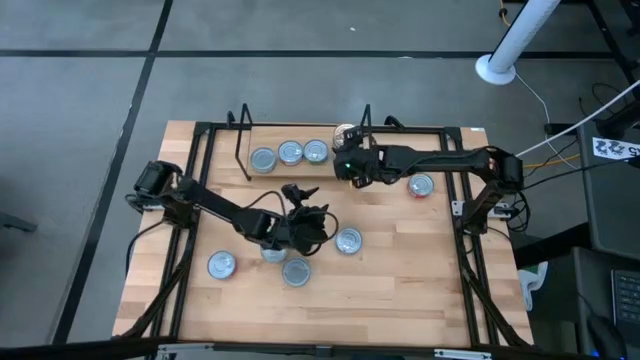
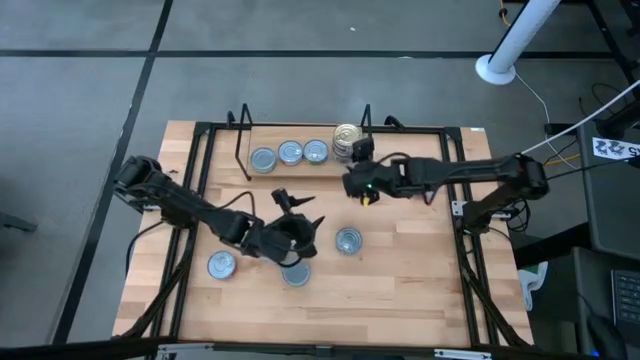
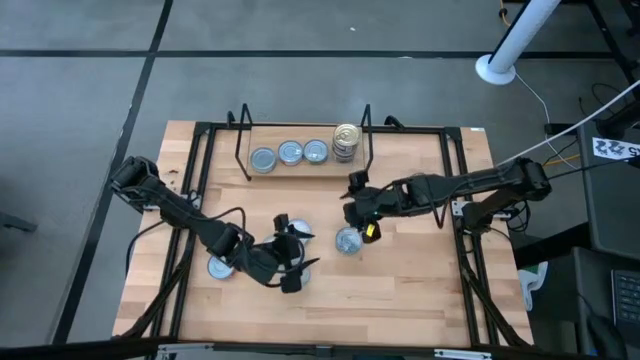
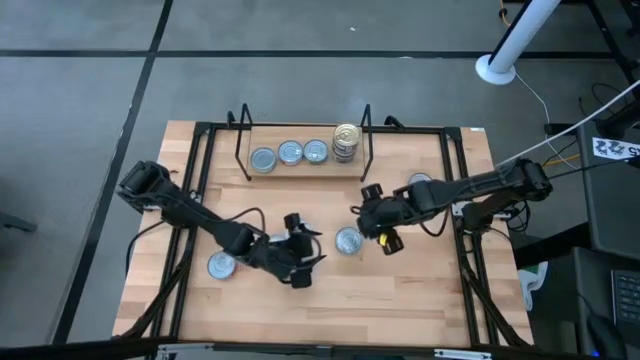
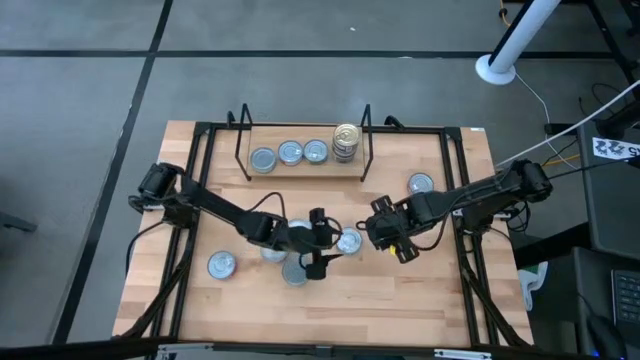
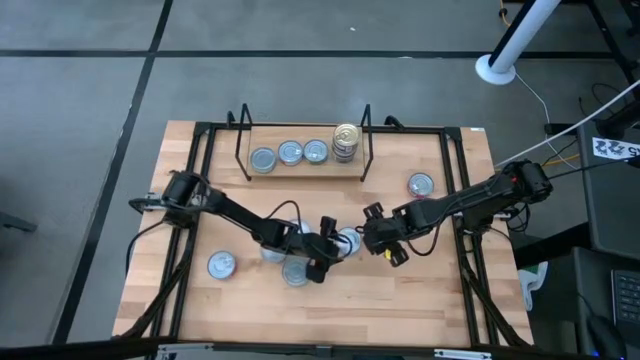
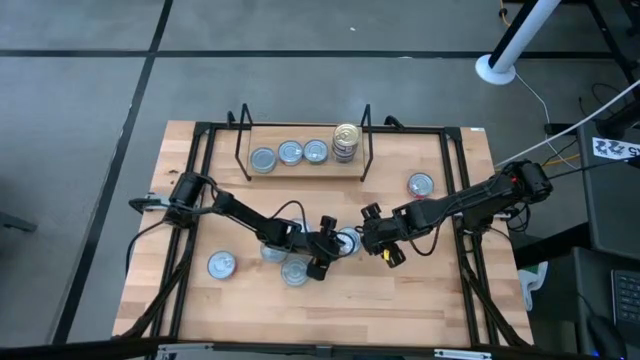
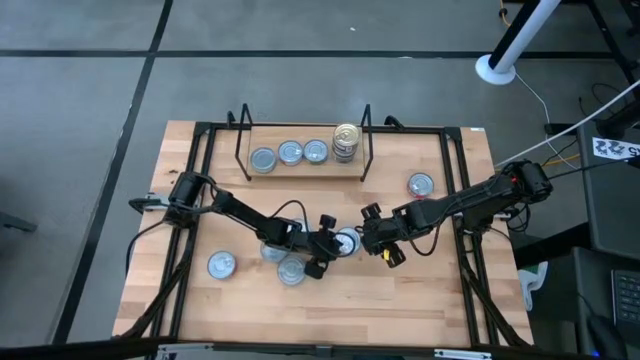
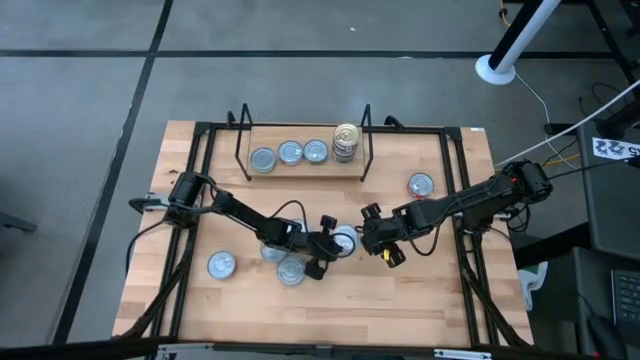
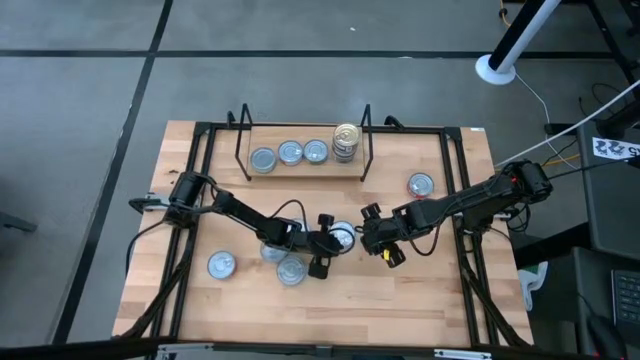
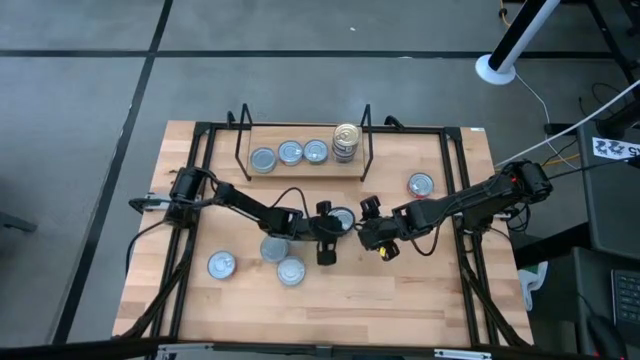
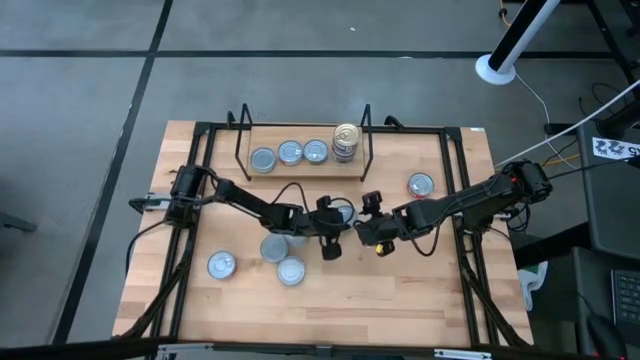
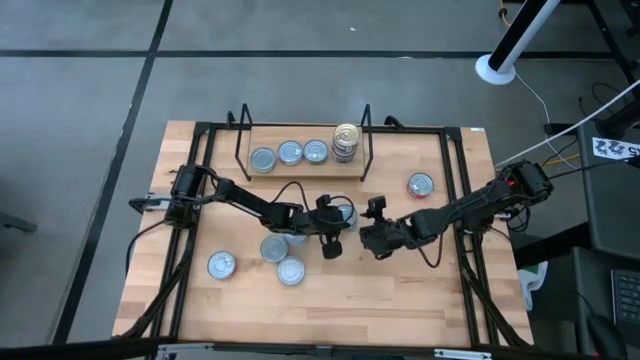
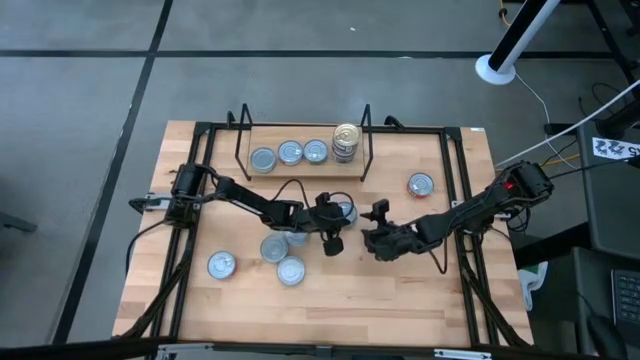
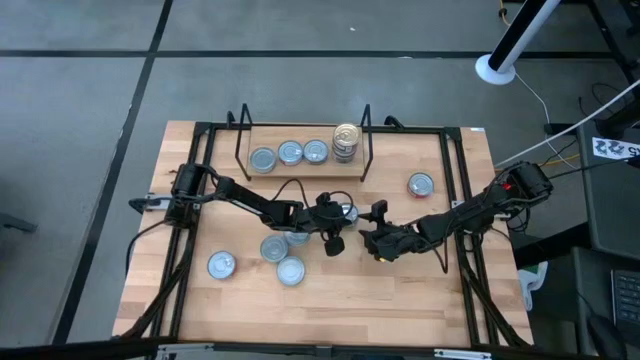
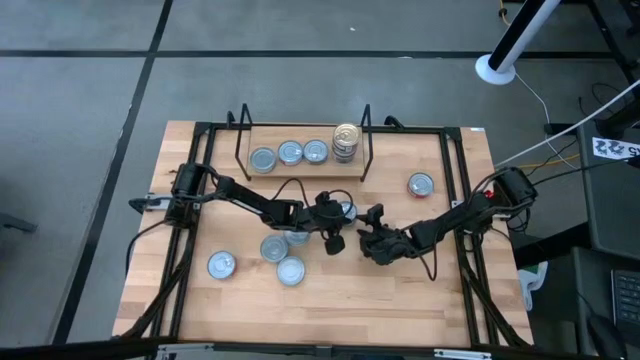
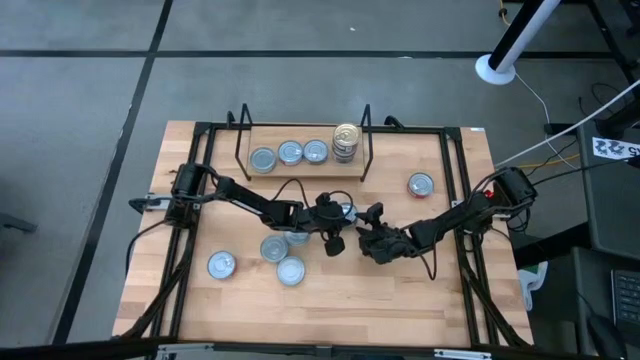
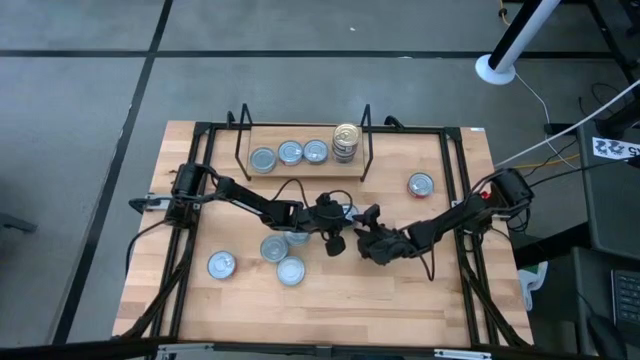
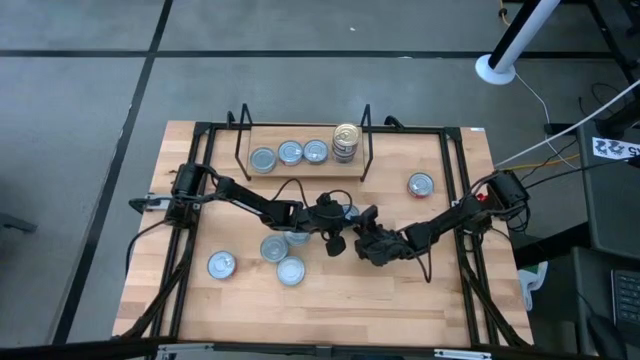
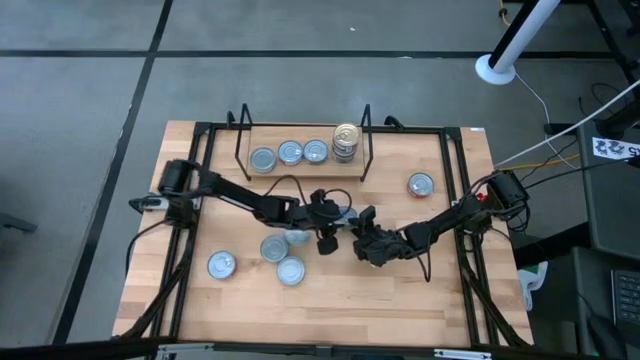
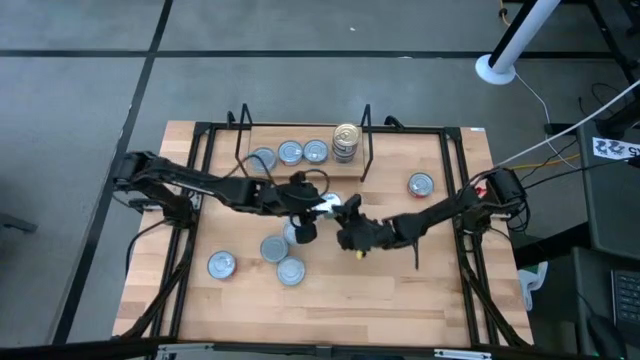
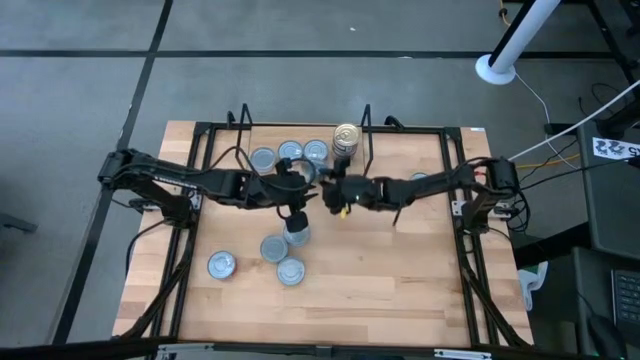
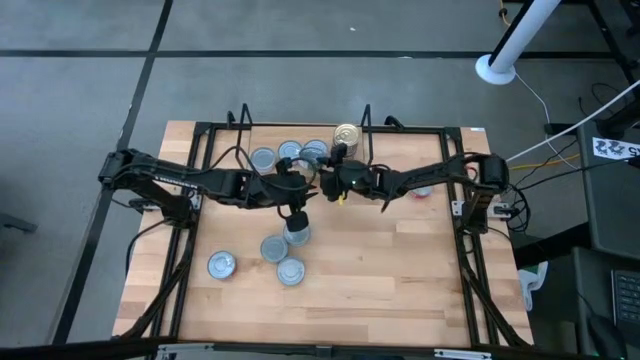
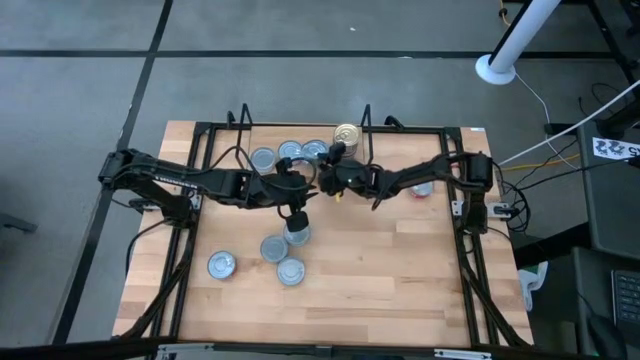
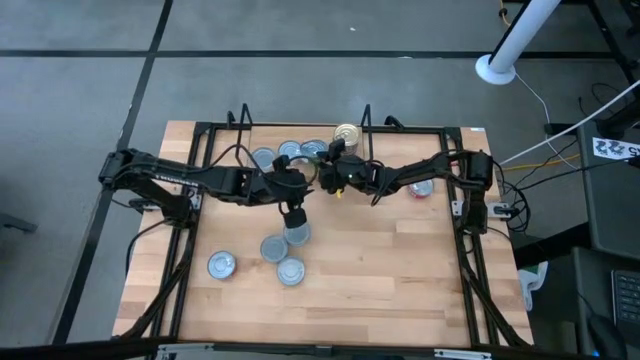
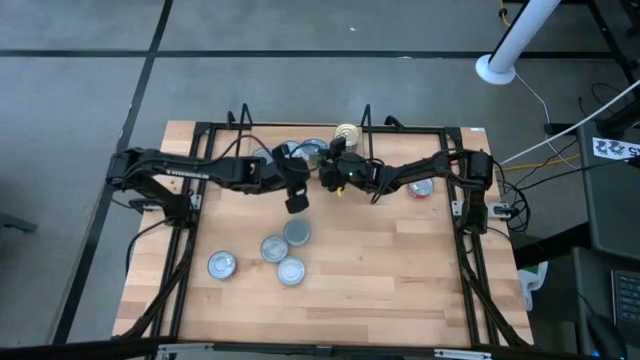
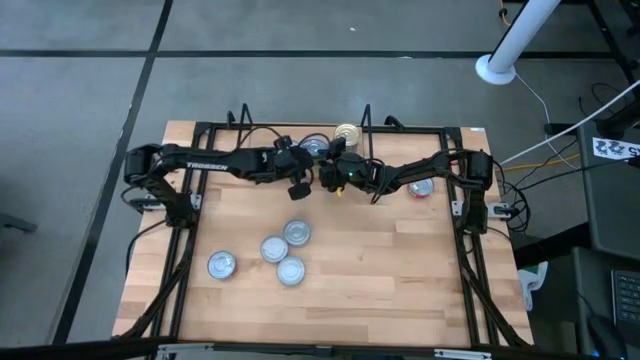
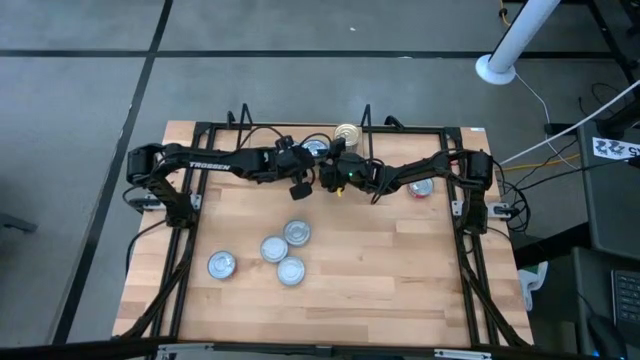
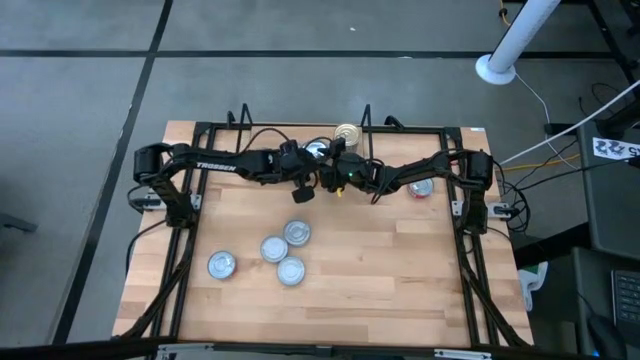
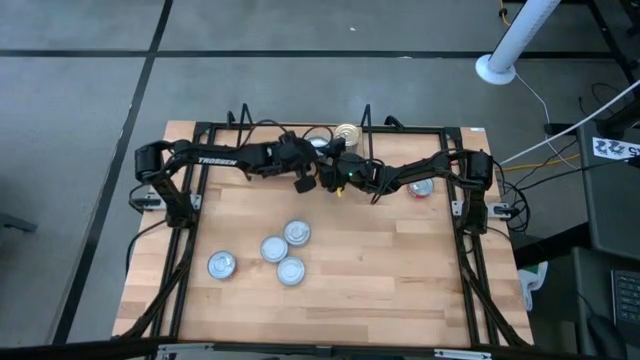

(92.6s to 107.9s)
Task: Stack canned seafood by type on shelf
Stack the green tuna can on top of the green tuna can on the shelf

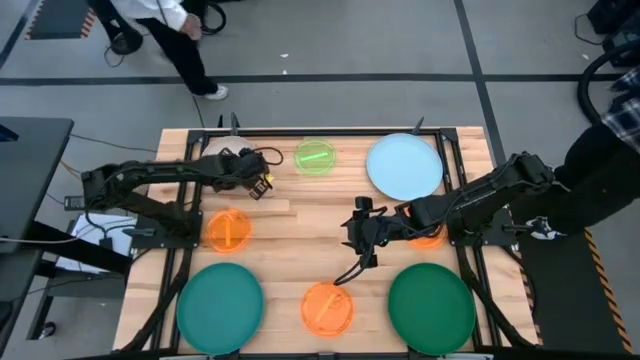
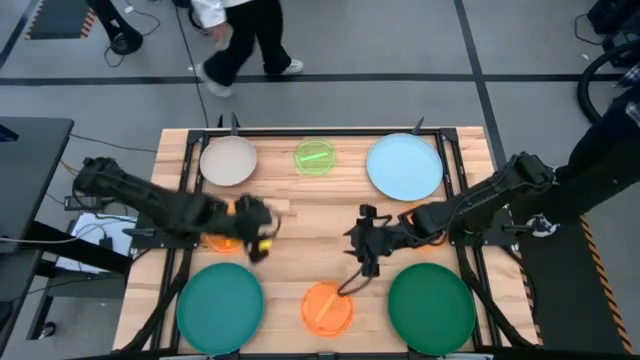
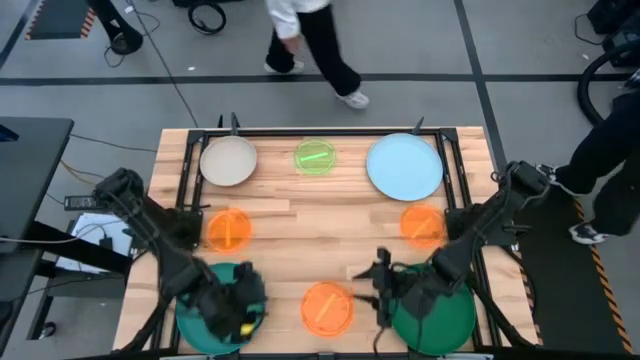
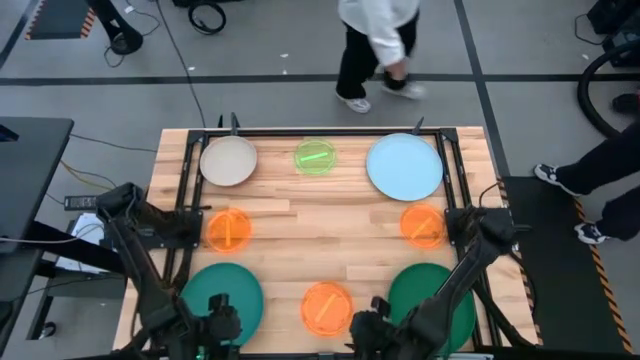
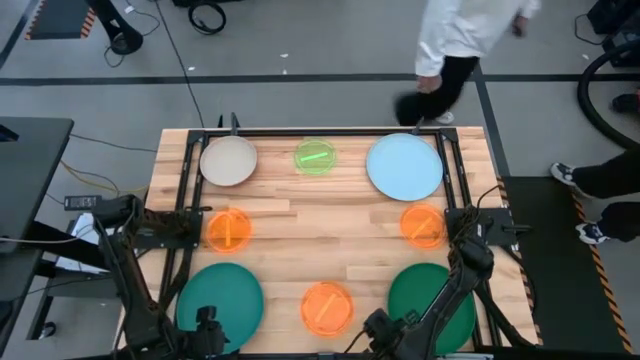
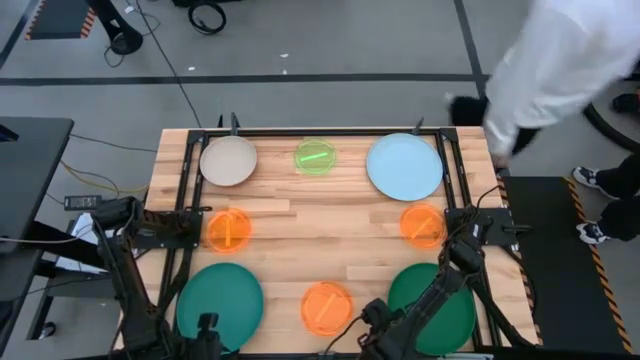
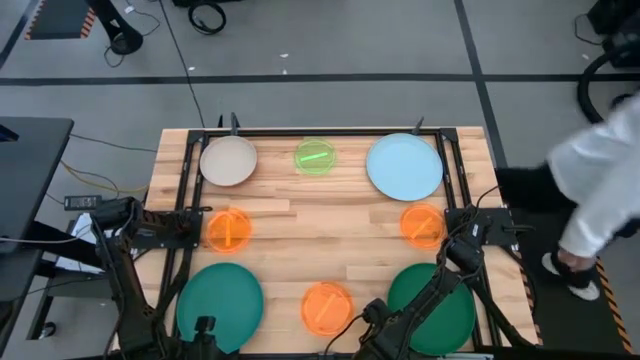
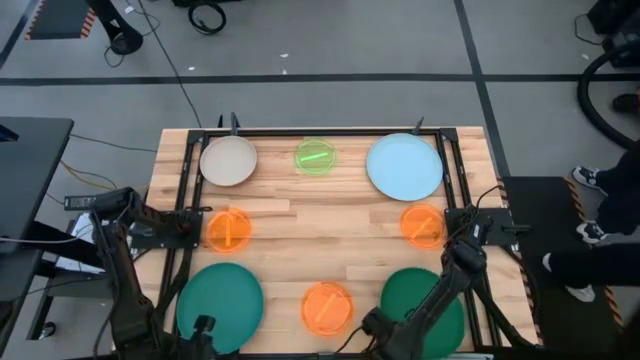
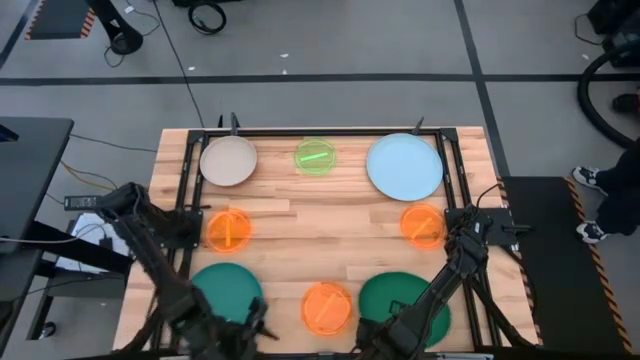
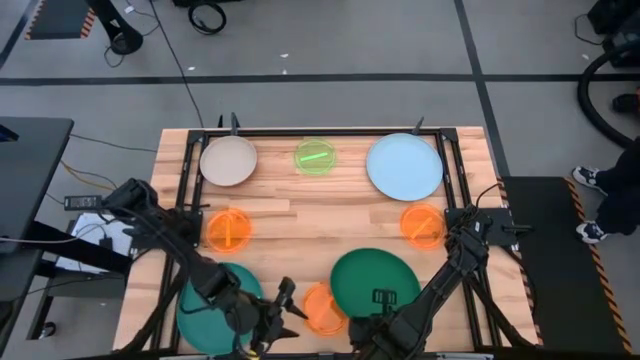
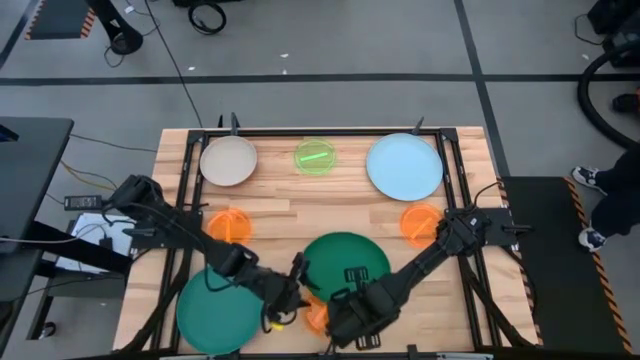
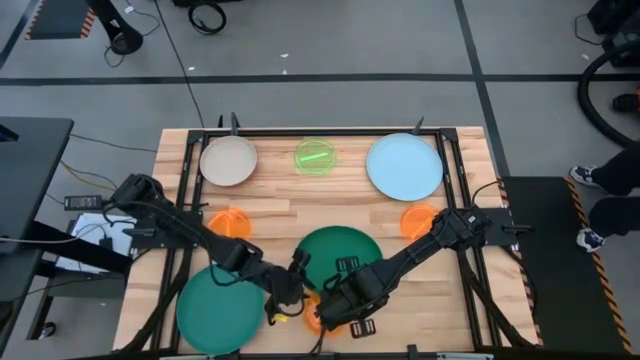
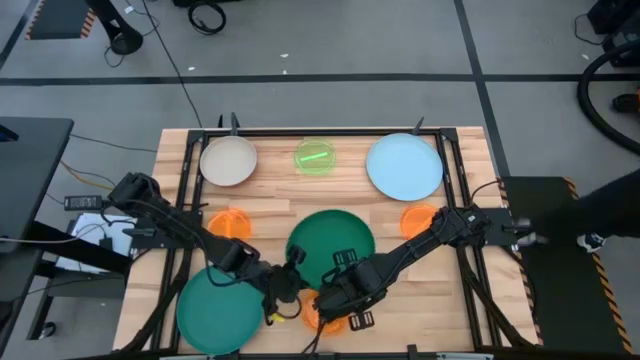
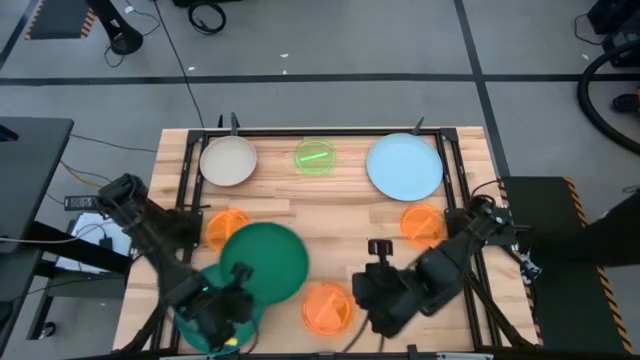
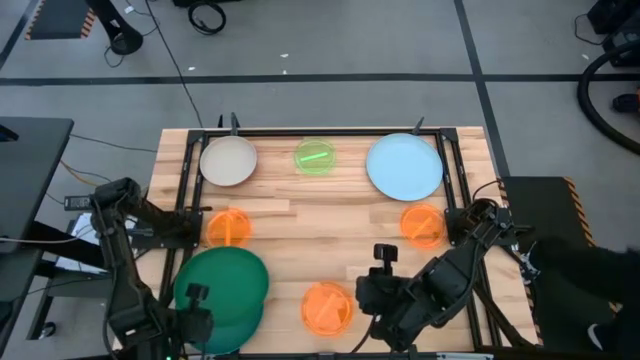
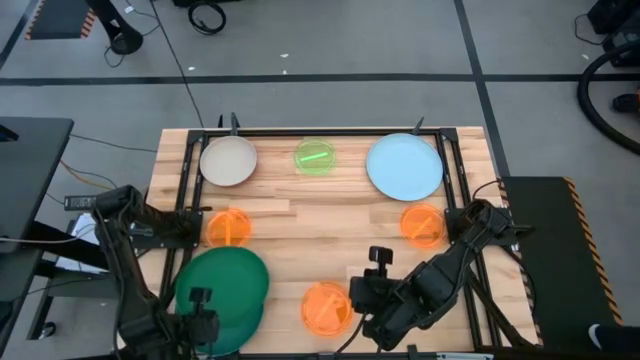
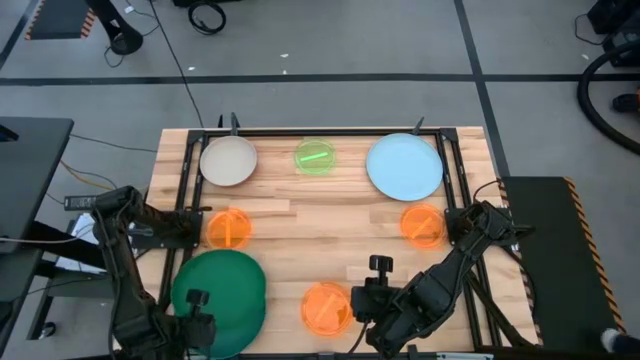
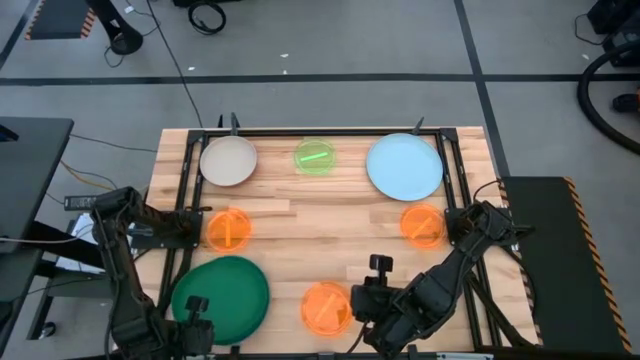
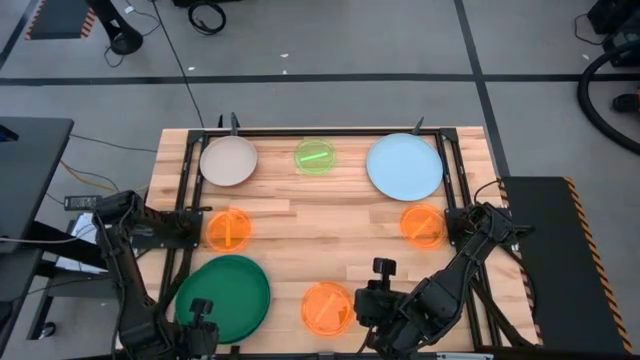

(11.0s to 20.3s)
Task: Stack plastic plates
Stack the green plate on top of the blue plate
